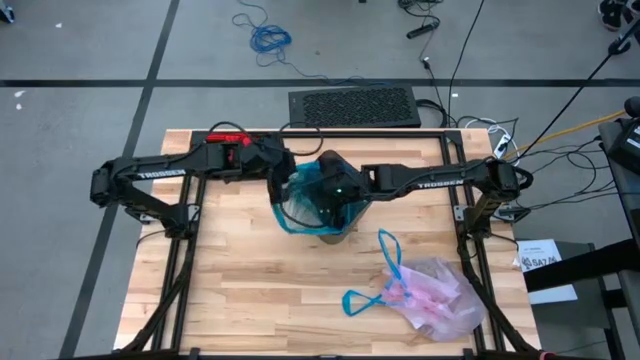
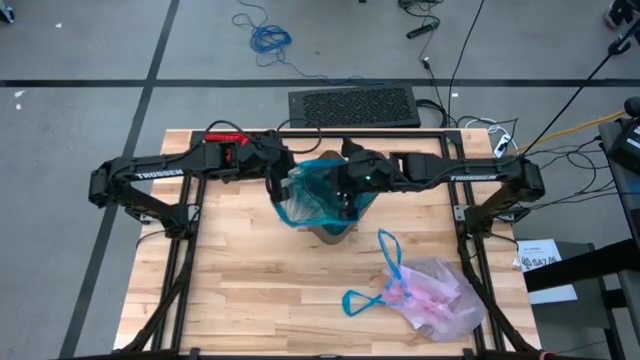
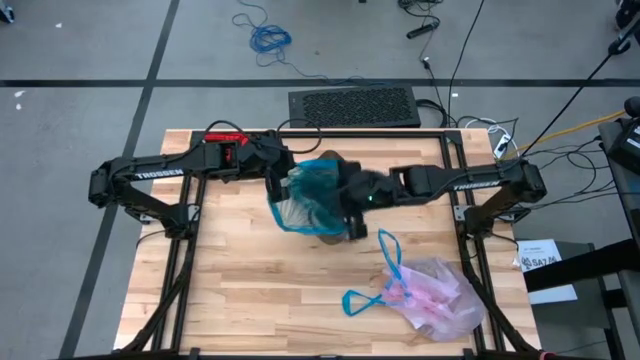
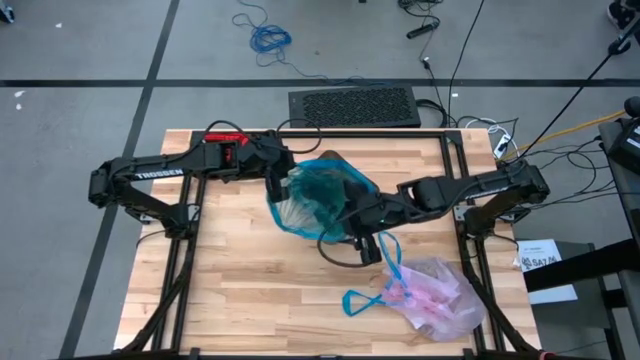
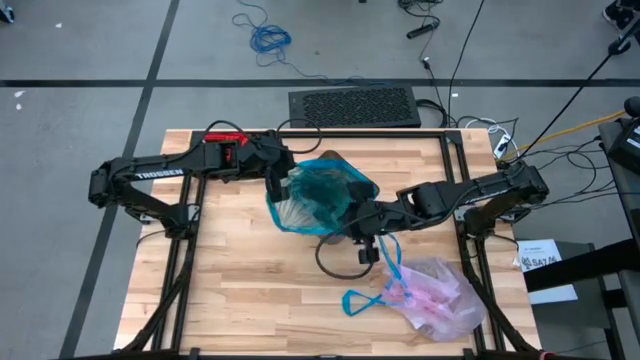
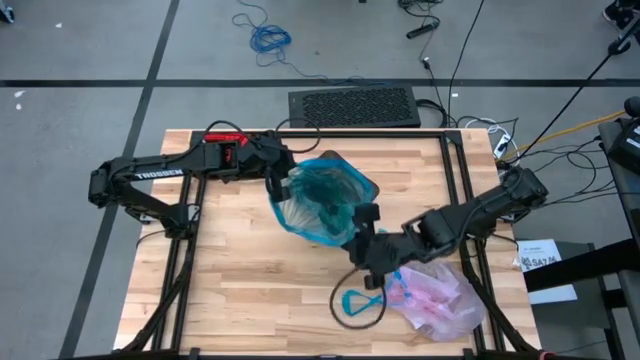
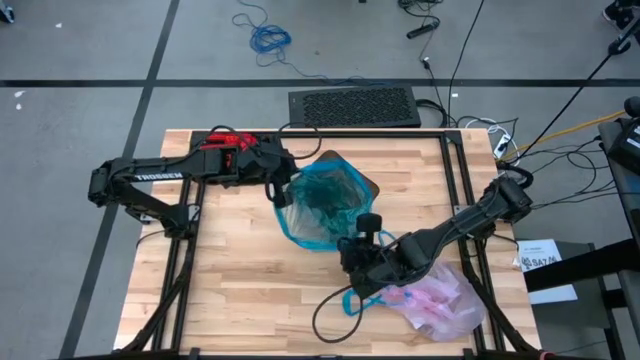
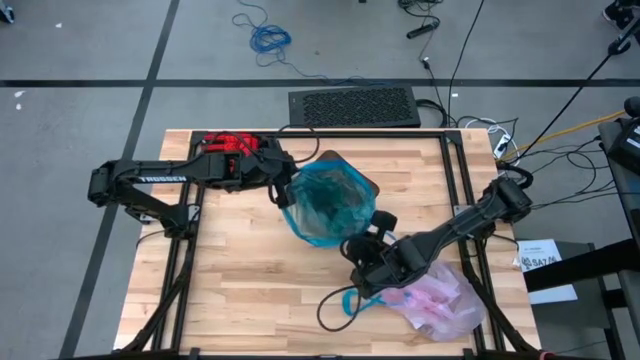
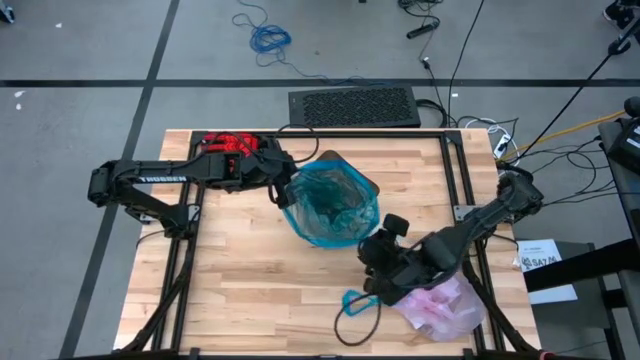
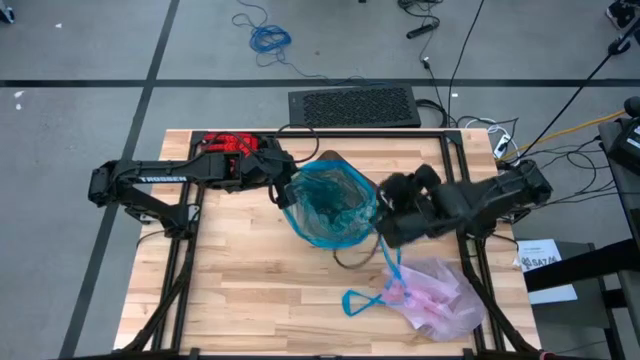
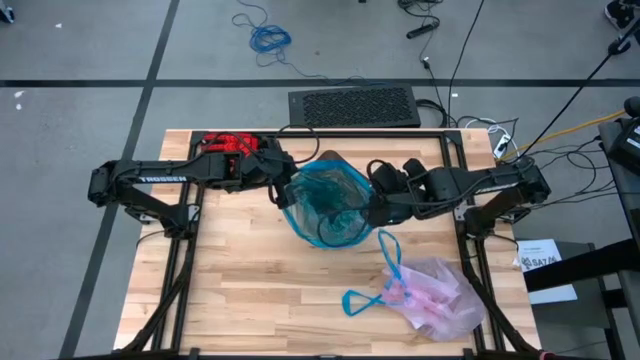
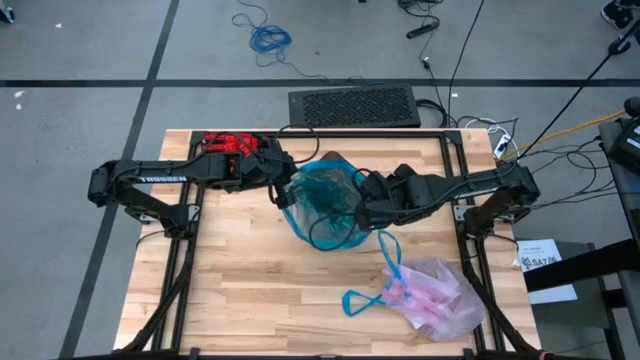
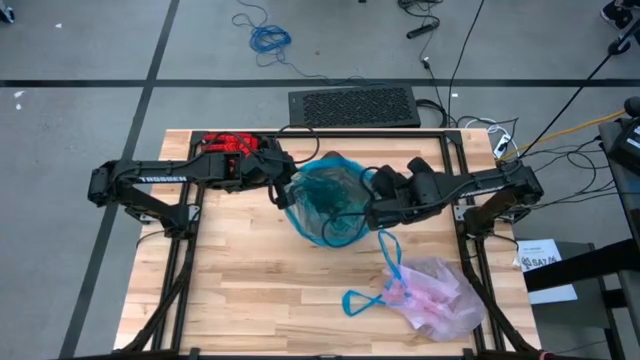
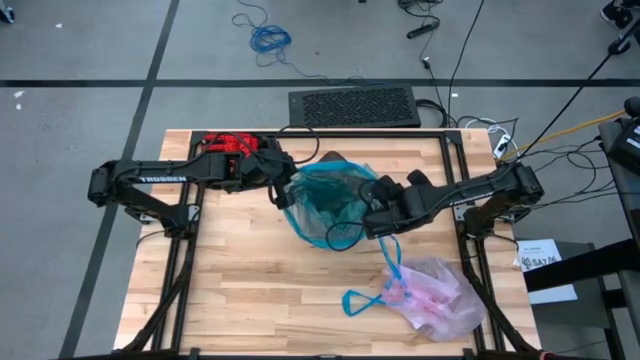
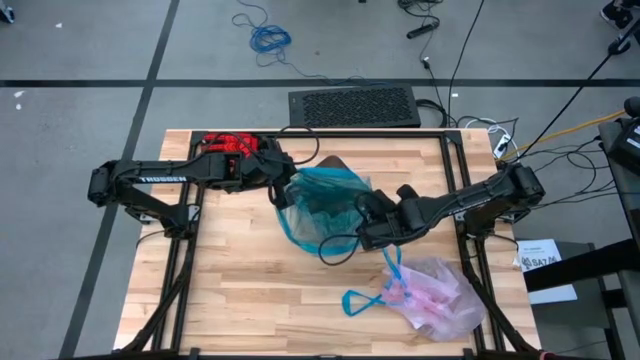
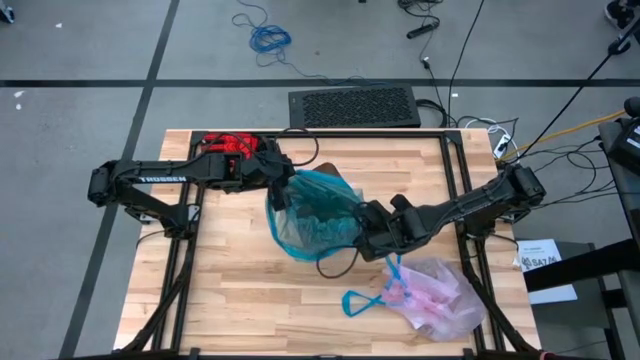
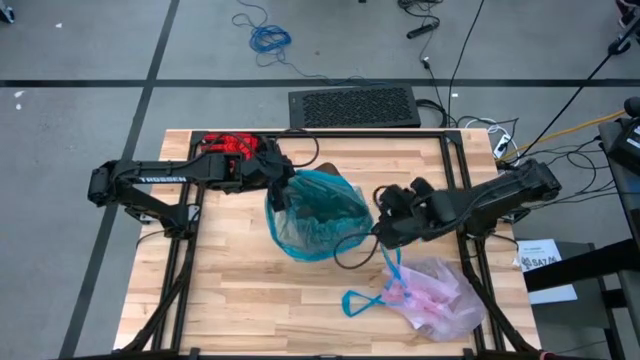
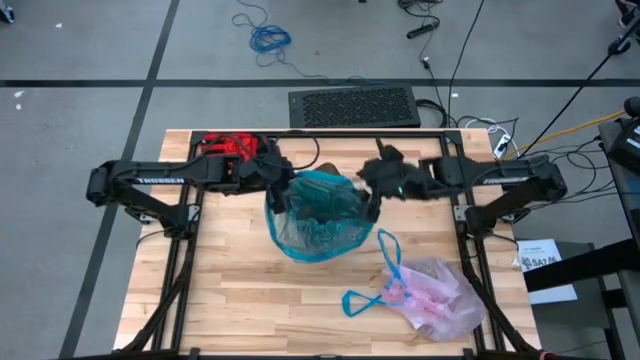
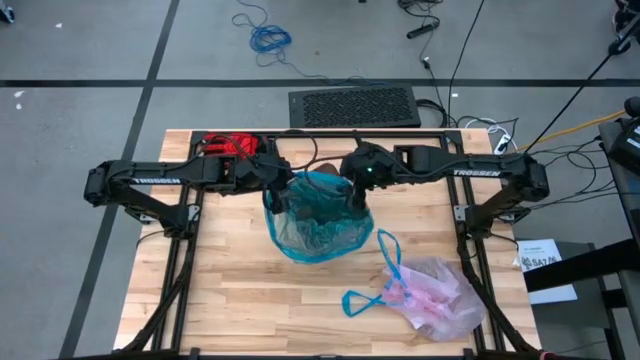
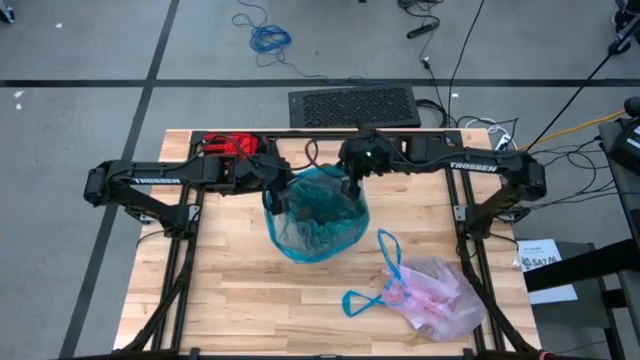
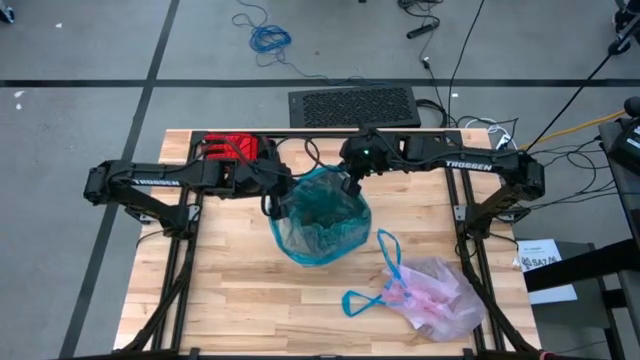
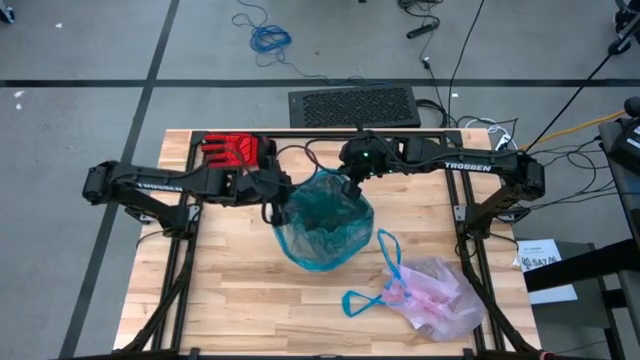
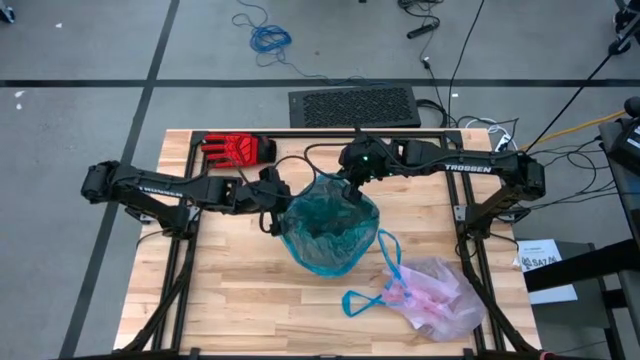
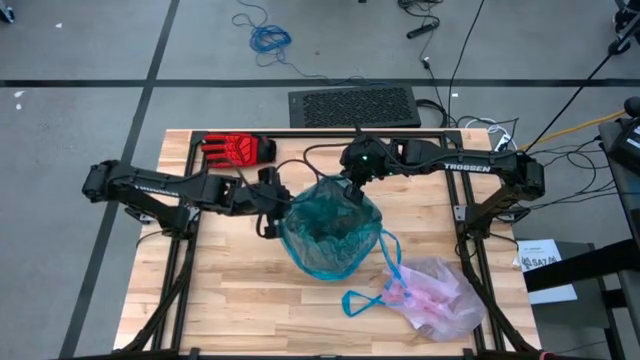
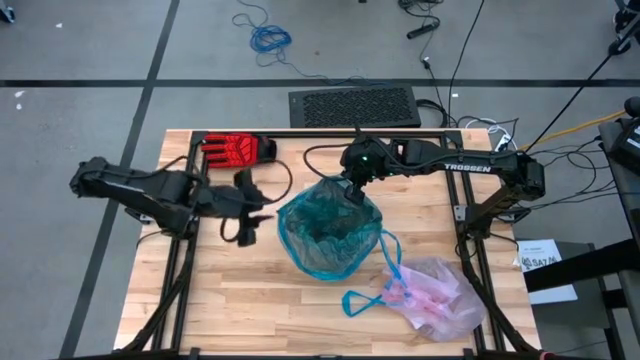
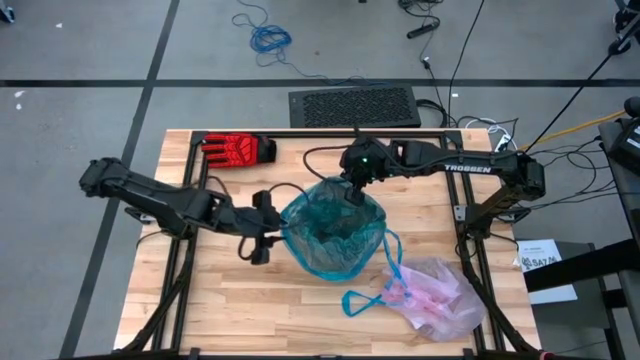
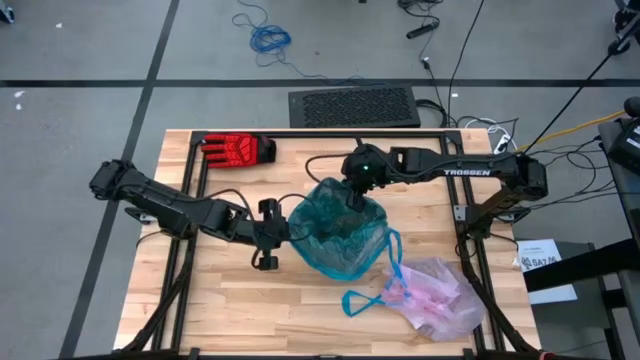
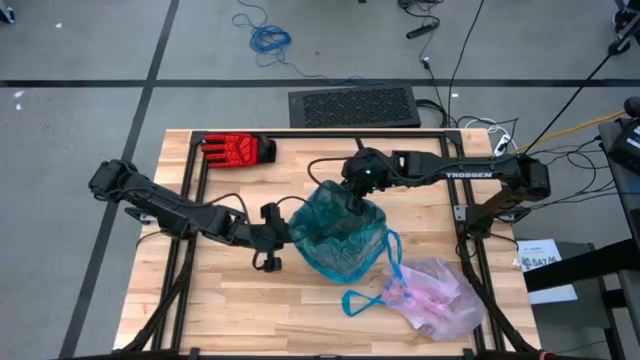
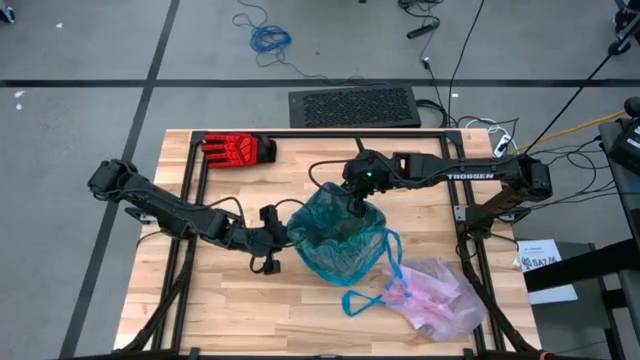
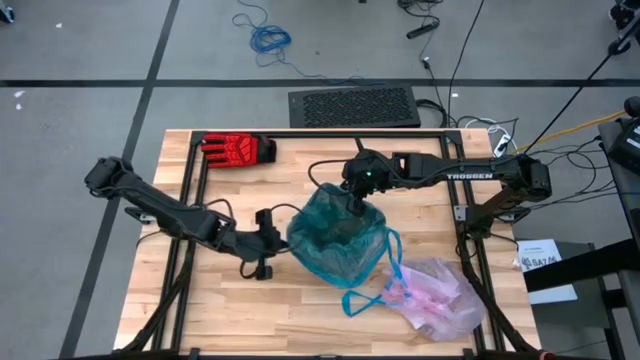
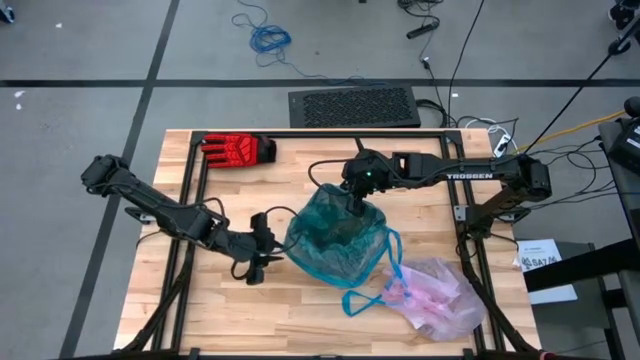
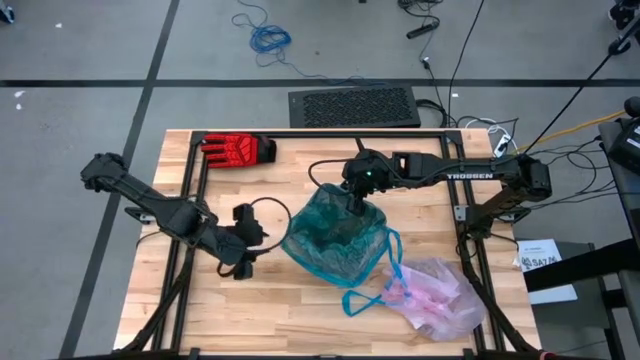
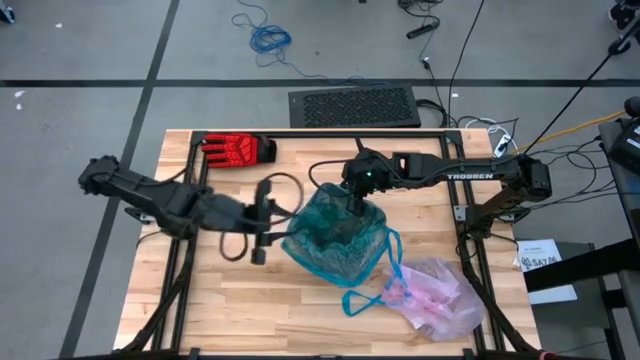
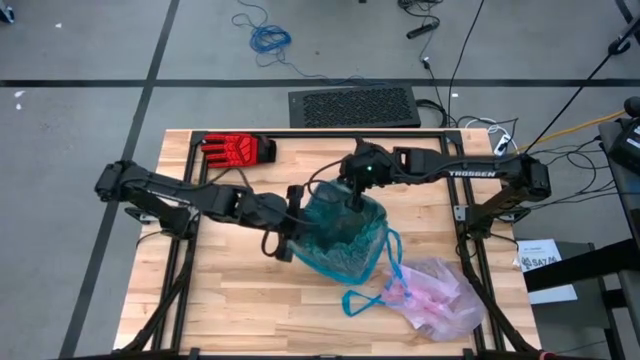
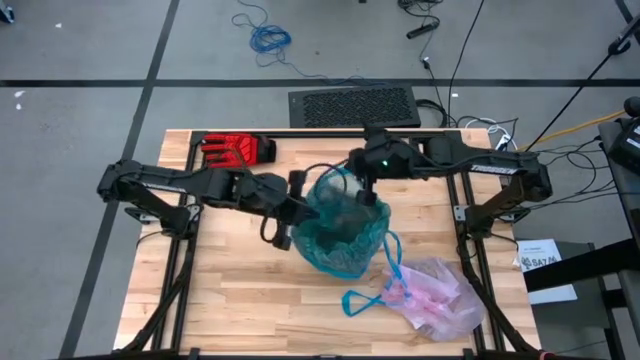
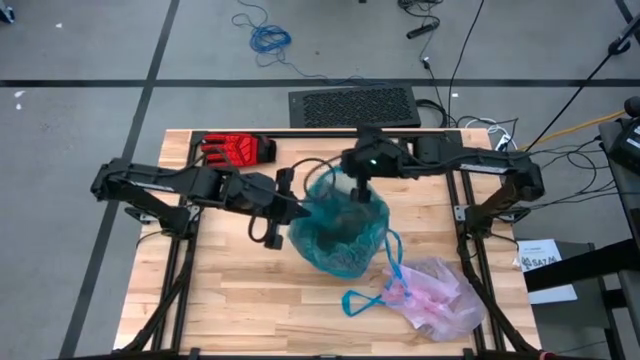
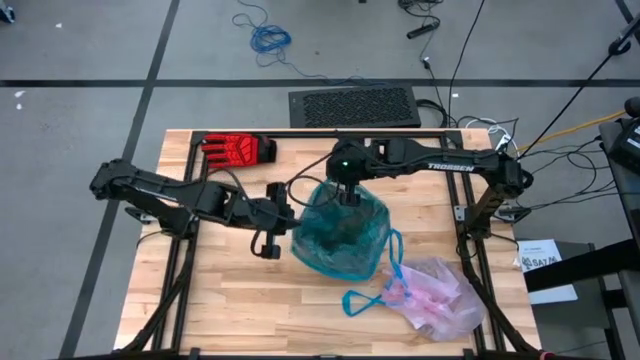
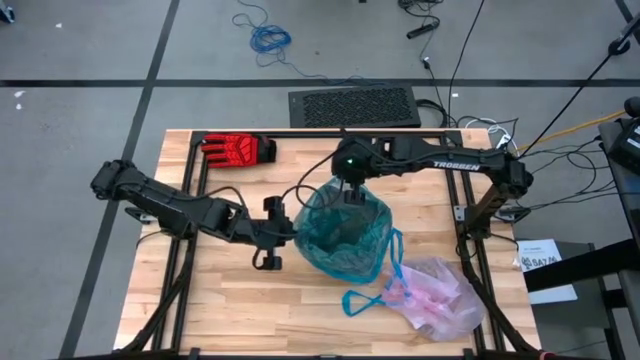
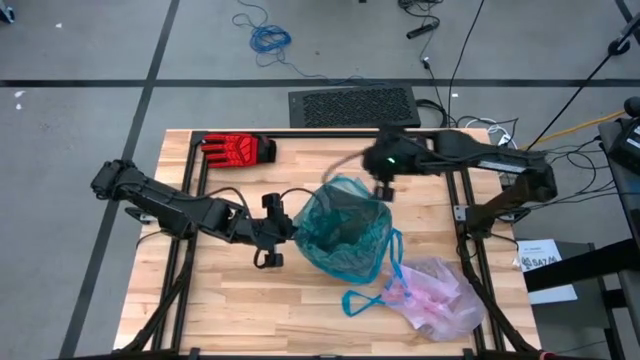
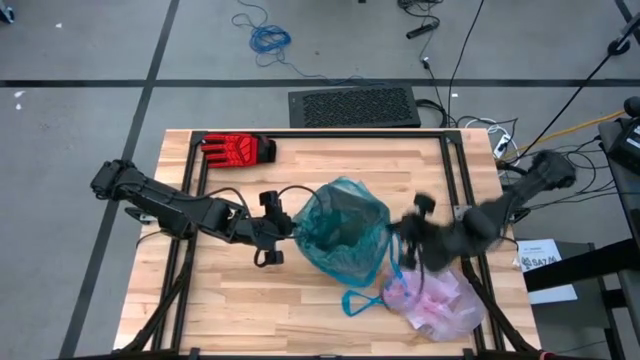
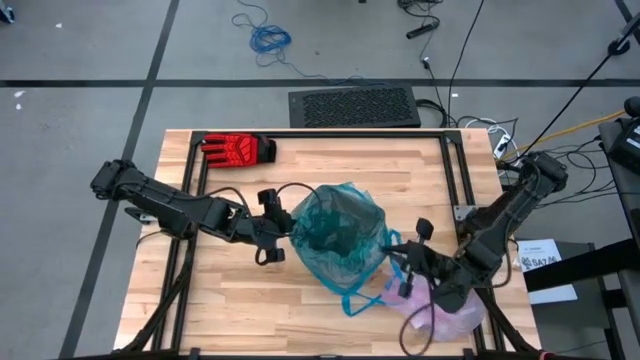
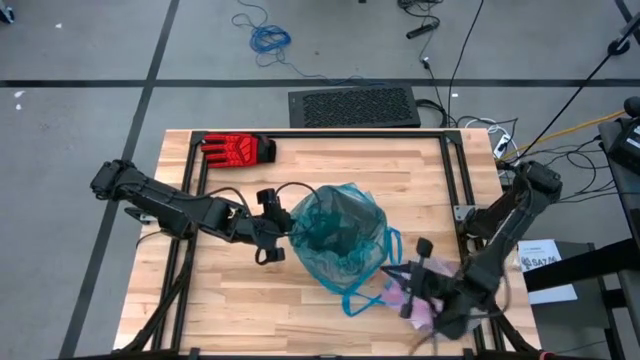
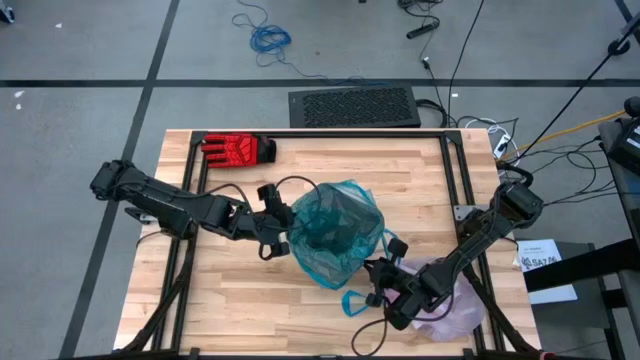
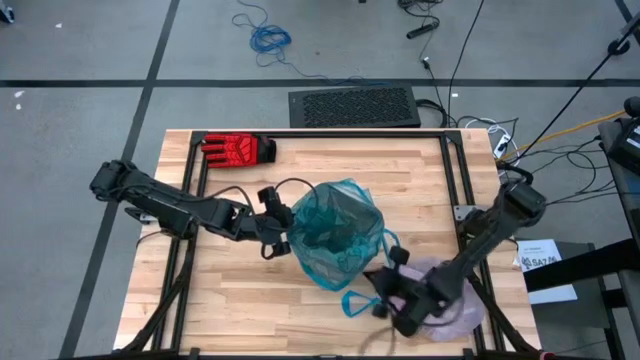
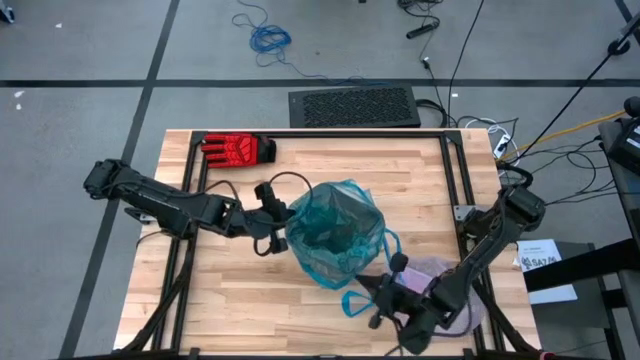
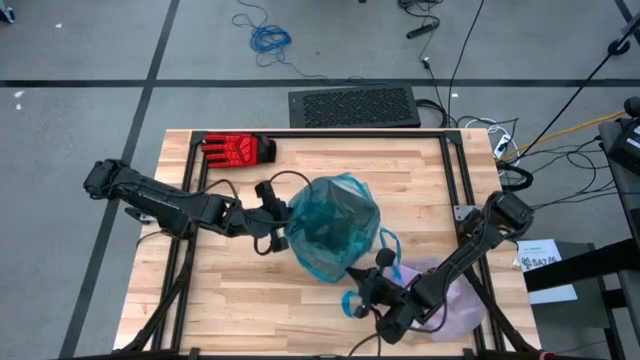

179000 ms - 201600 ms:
Task: place trash/remove bag and relplace
Insert the blue trash bag into the black trash bin
